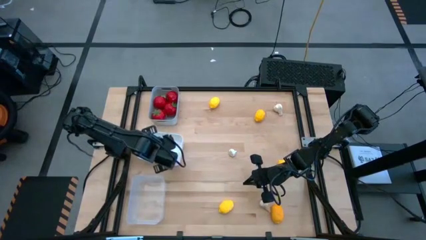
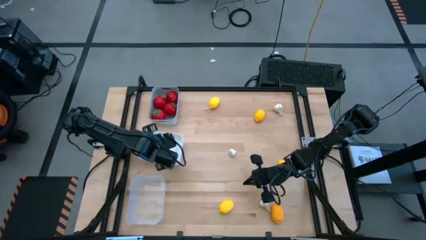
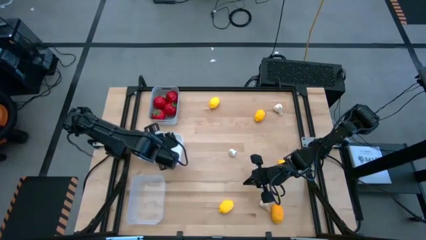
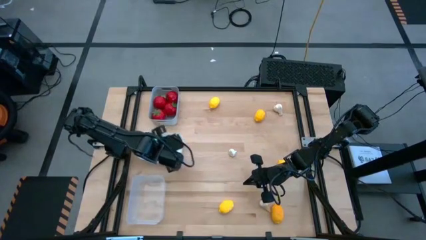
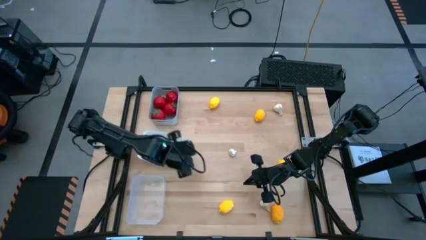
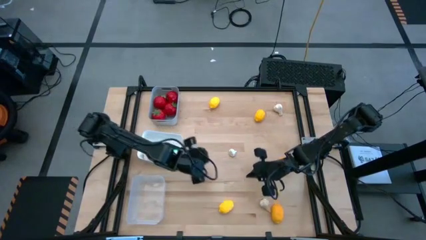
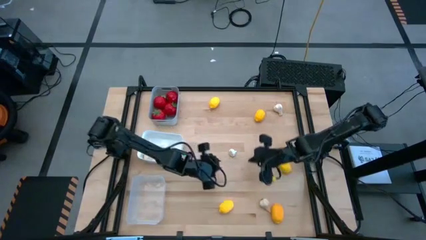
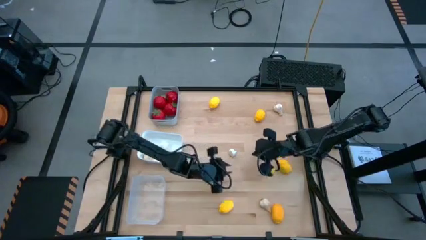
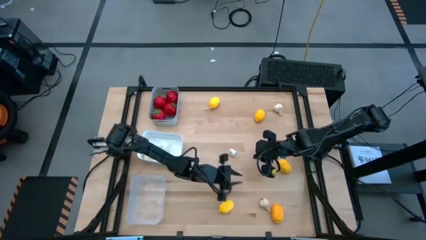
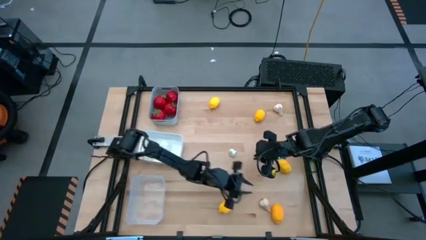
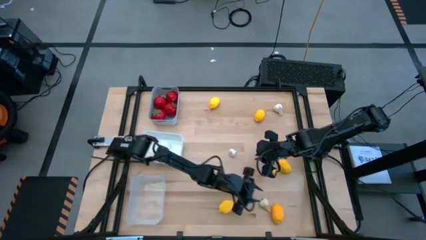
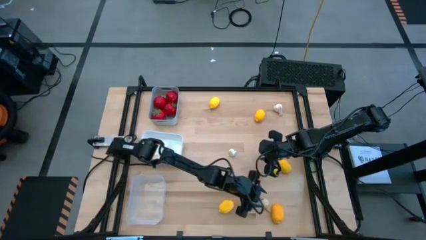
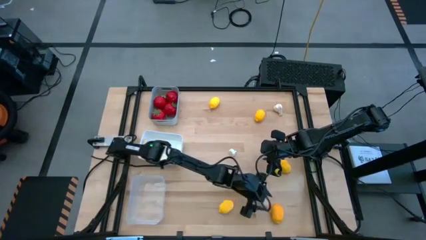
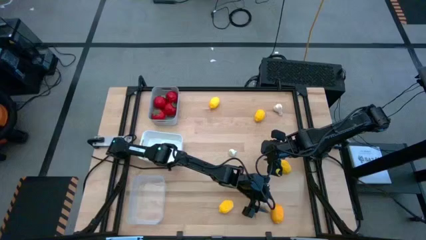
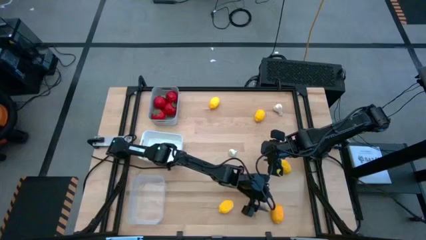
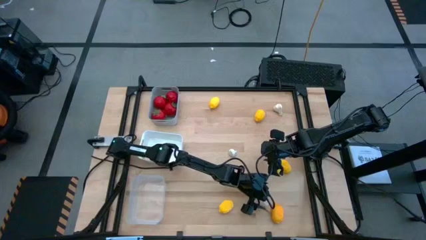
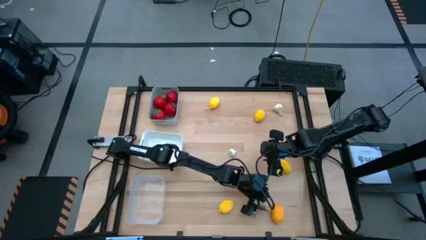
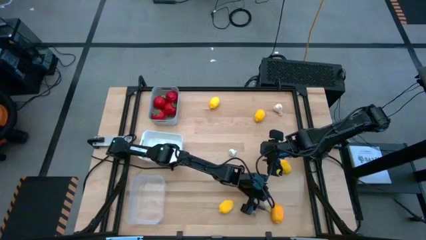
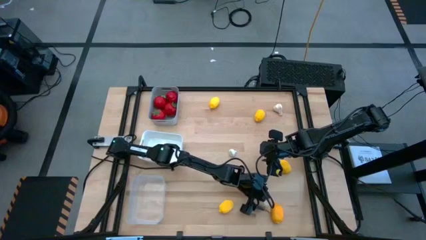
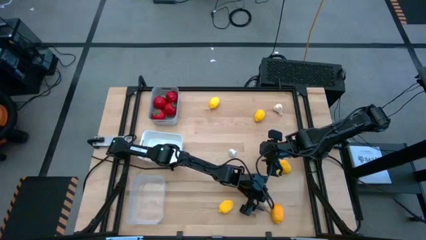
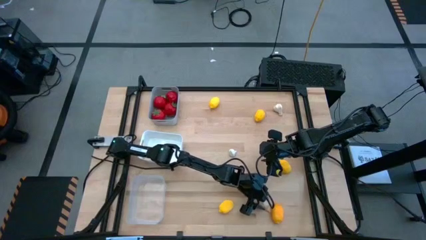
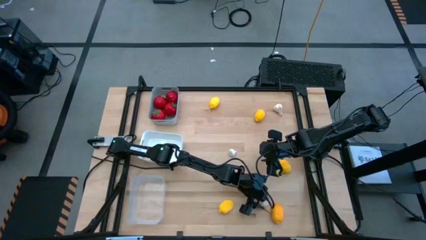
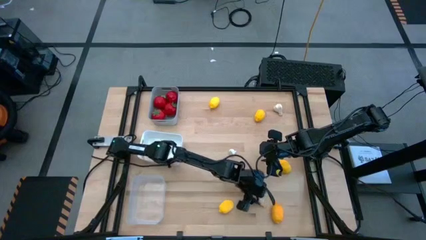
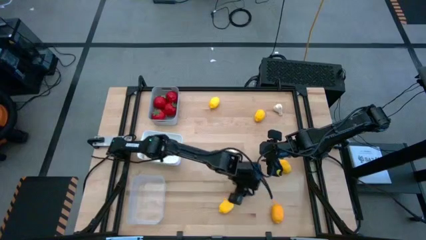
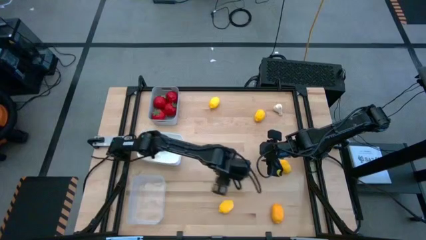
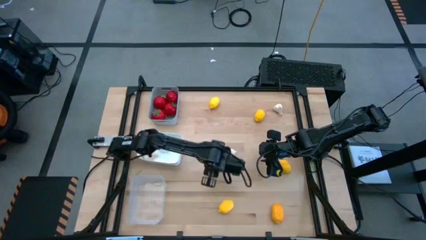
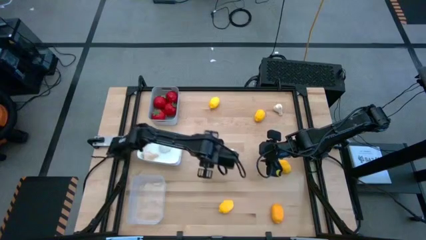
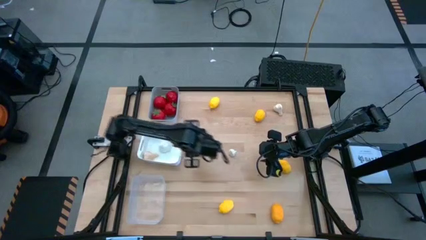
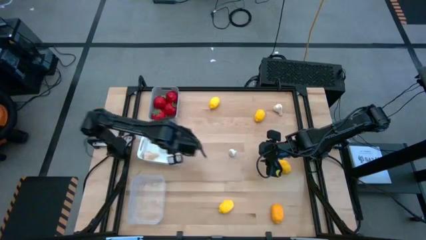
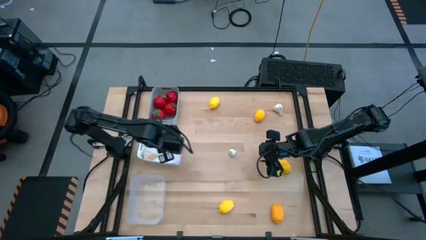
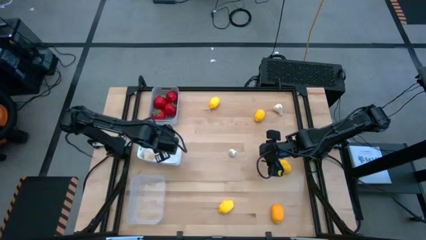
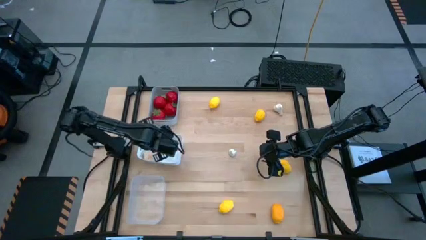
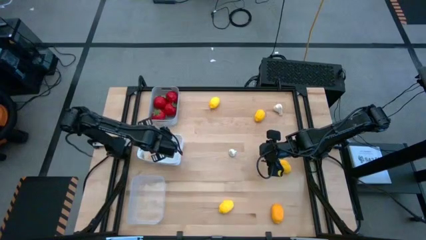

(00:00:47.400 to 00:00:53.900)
Task: Sort produce into baskets
Put the white garlic into the white bin

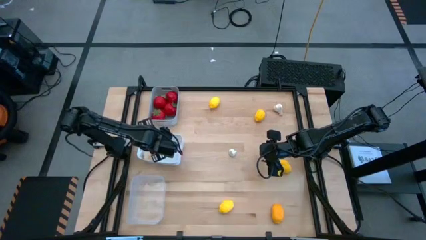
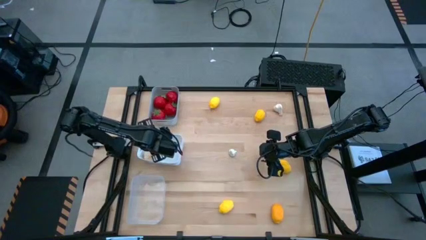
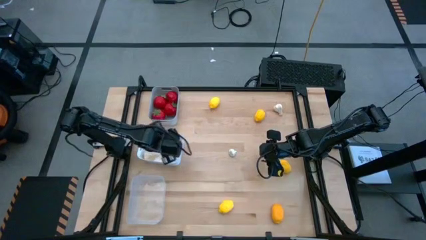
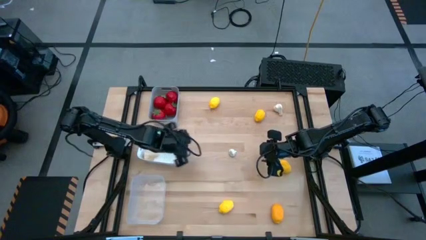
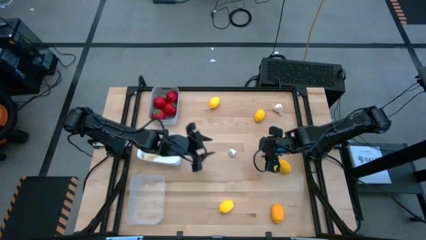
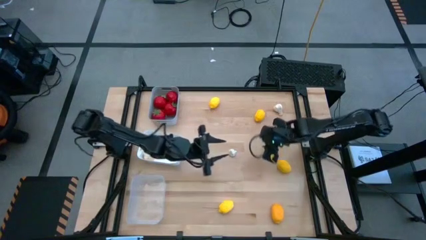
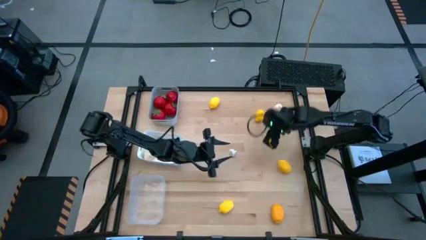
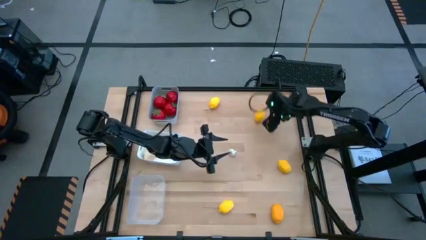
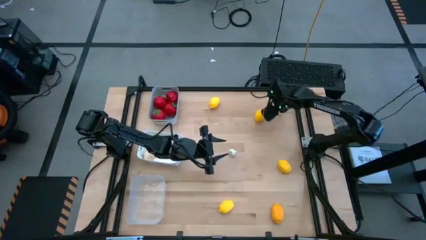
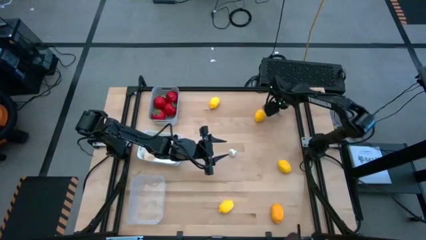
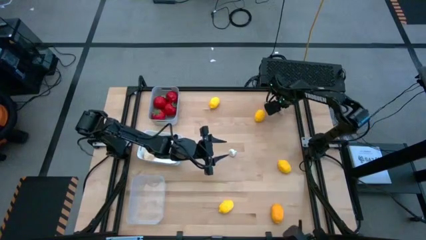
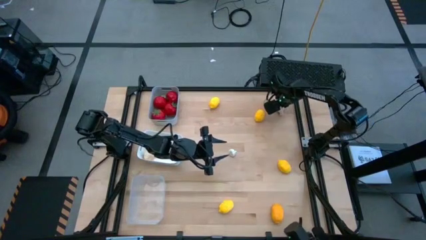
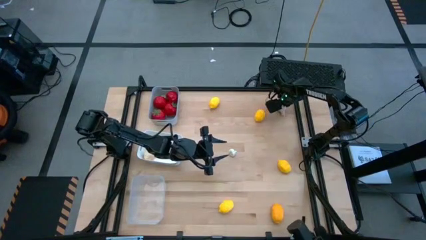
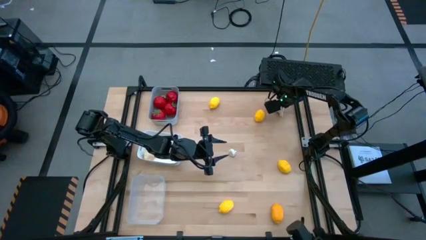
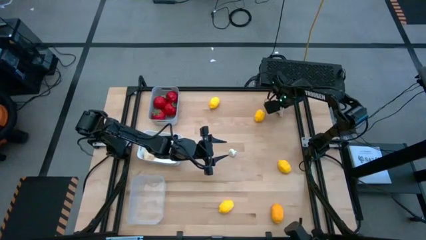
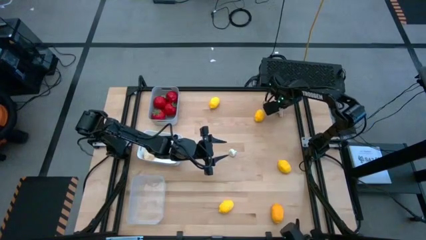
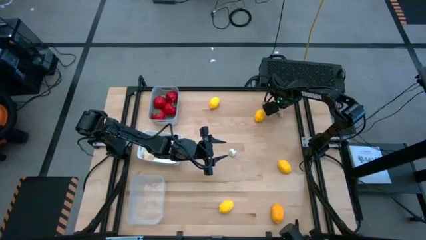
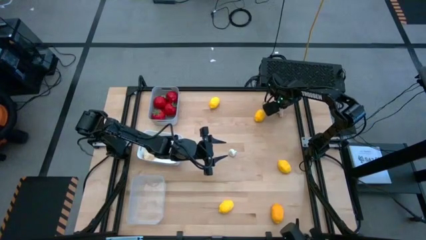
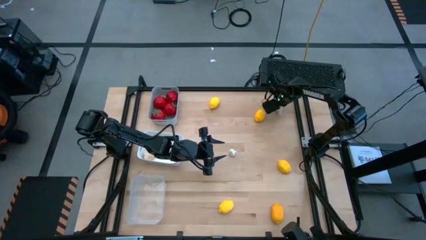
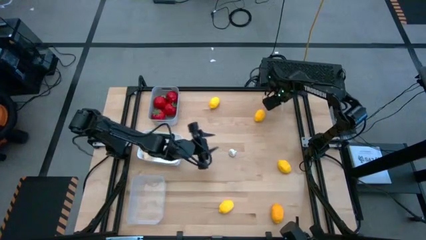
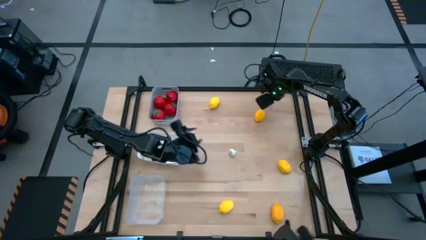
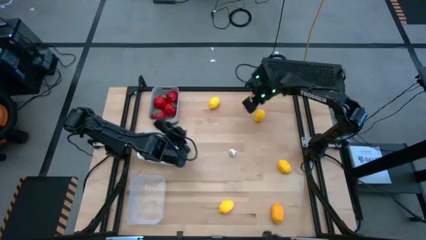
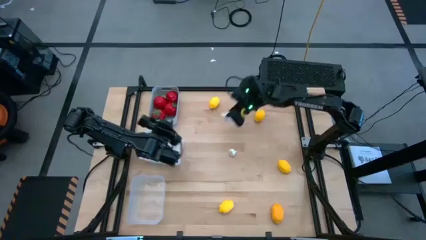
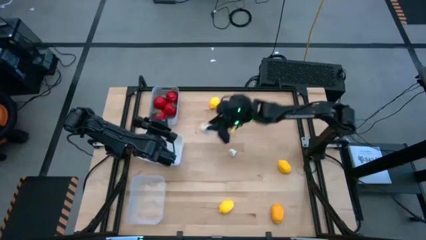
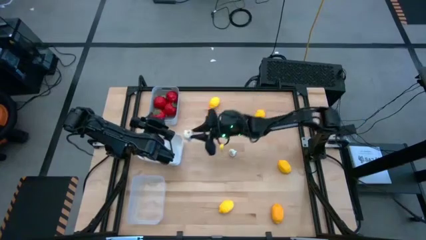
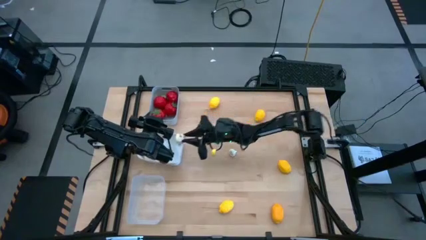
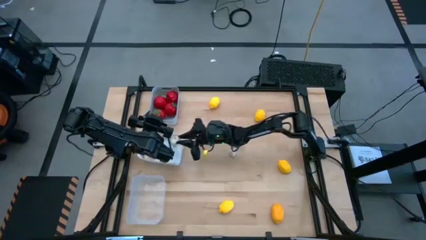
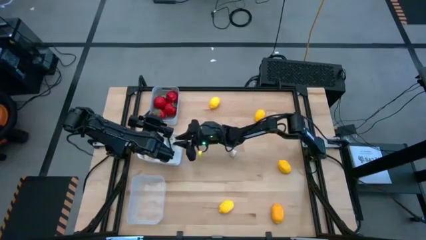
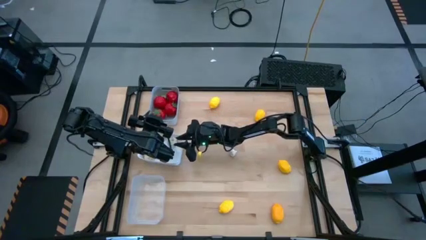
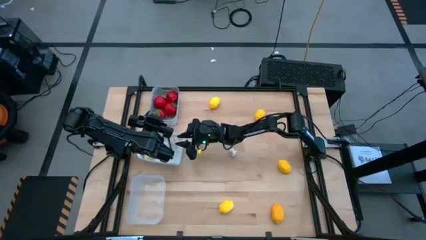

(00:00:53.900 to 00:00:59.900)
Put the white garlic into the white bin

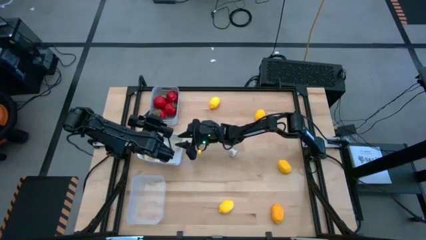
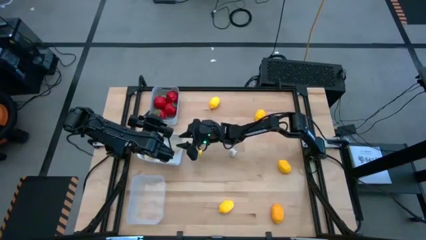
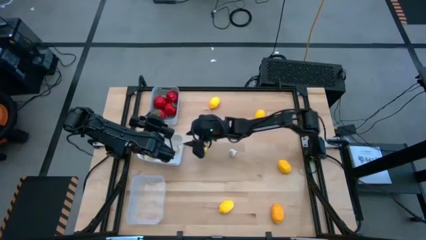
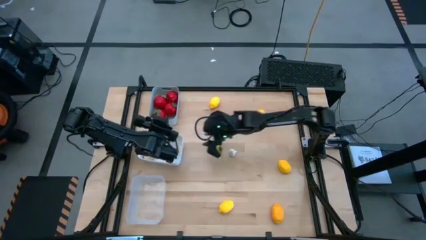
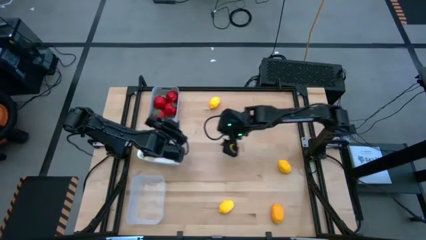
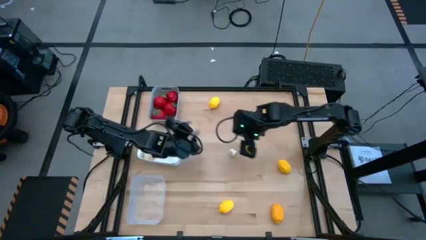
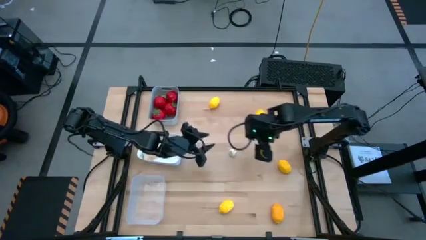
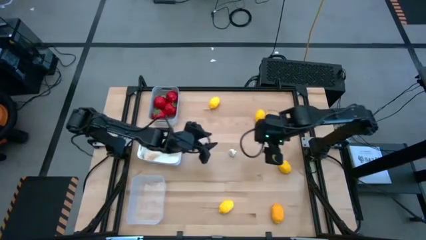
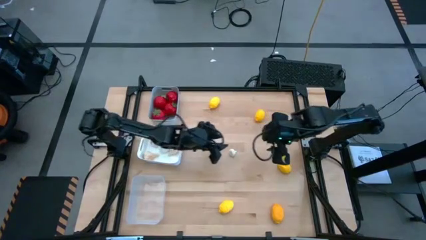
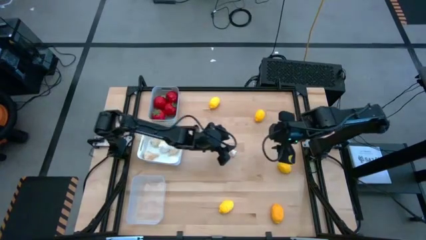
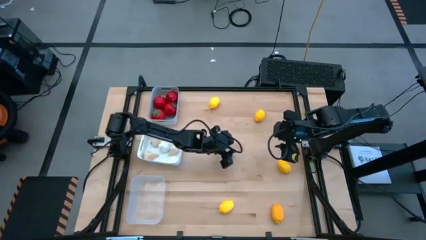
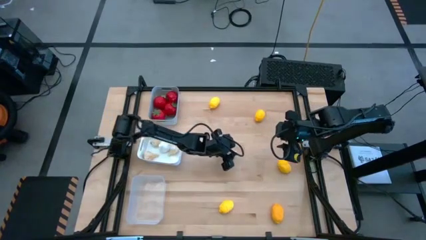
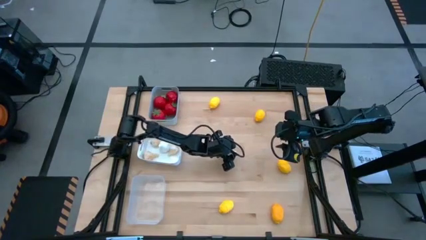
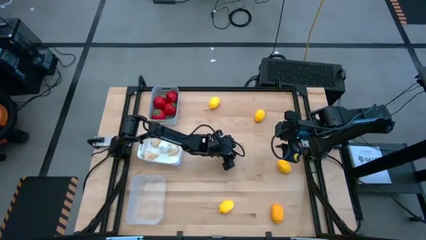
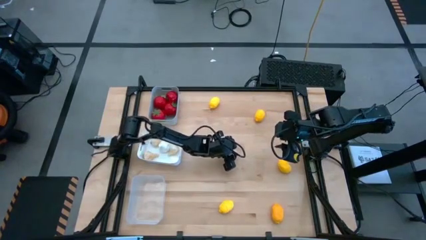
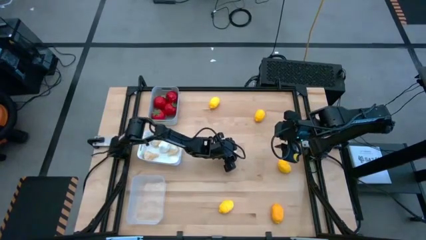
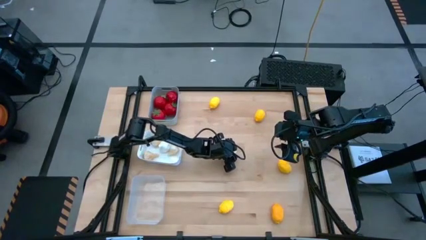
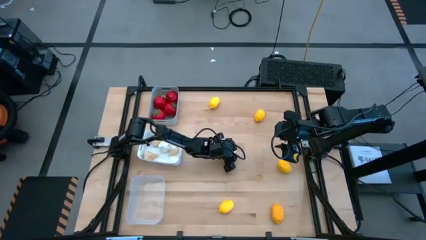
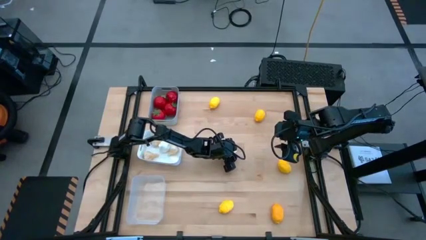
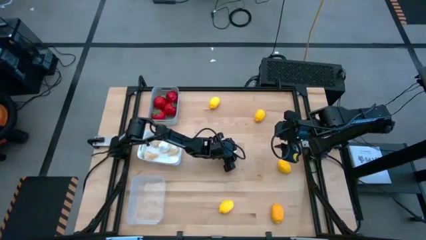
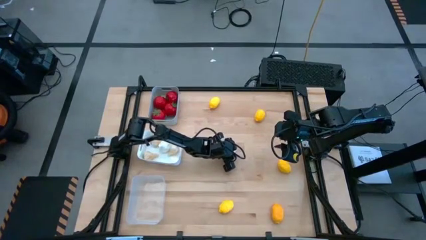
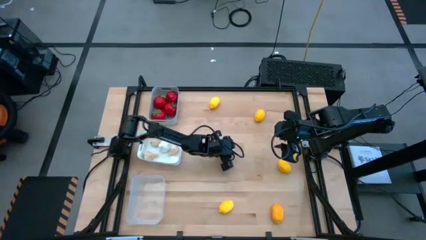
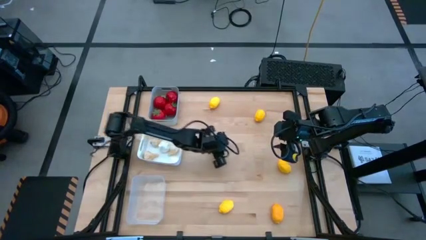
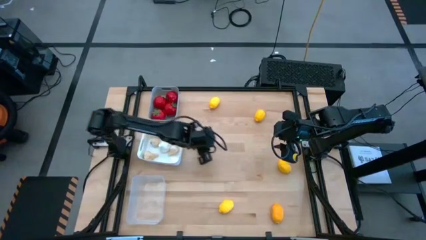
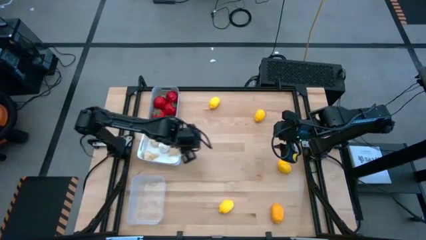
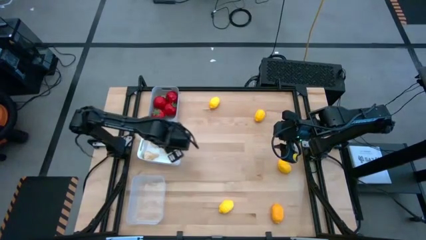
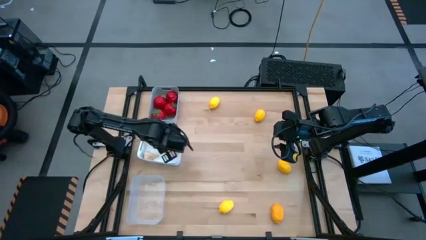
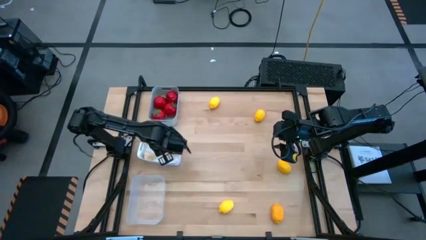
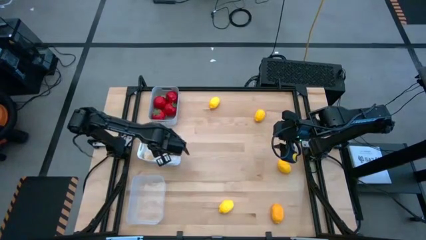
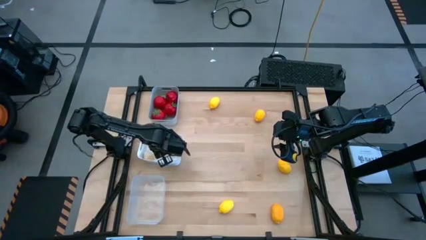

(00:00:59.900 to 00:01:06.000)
Put the white garlic into the white bin
